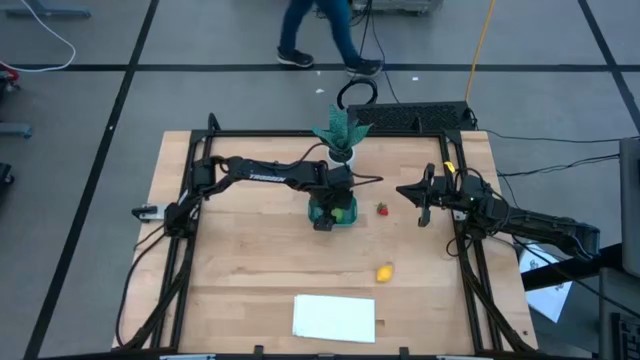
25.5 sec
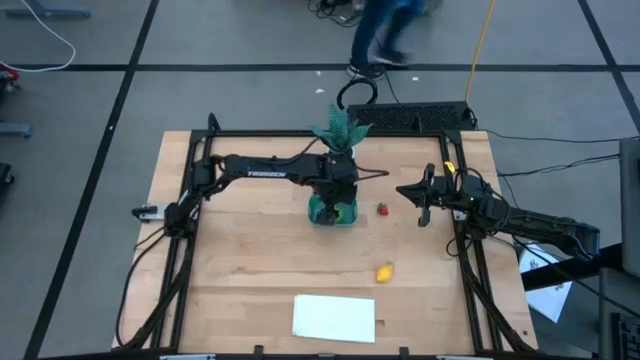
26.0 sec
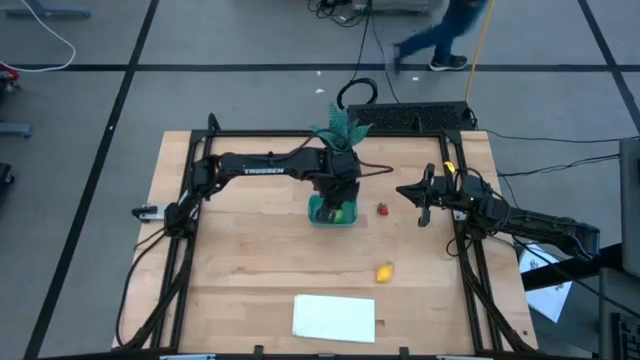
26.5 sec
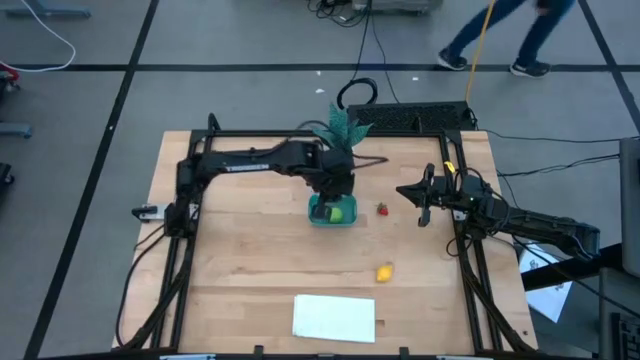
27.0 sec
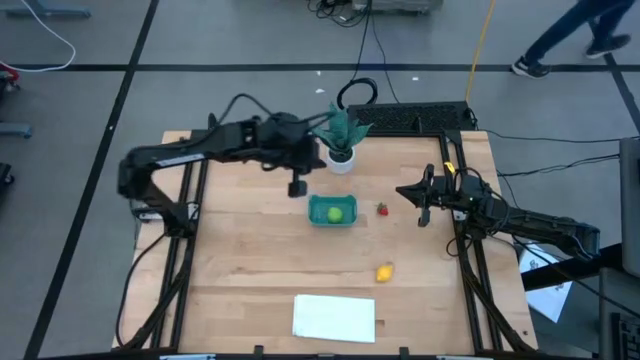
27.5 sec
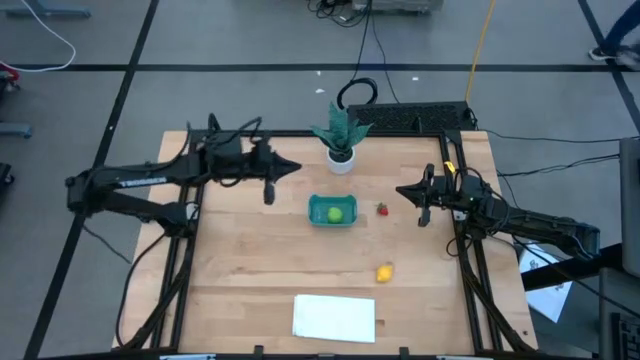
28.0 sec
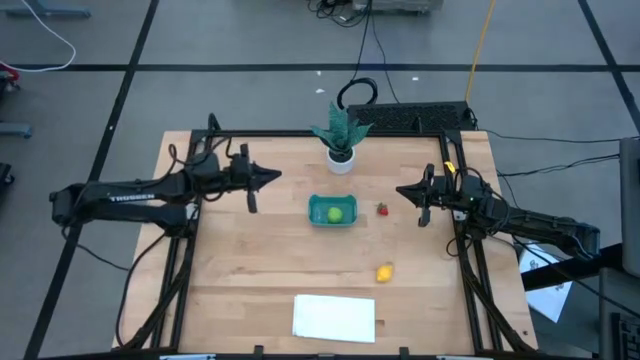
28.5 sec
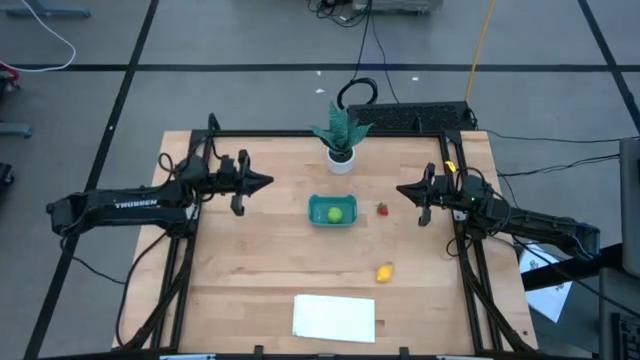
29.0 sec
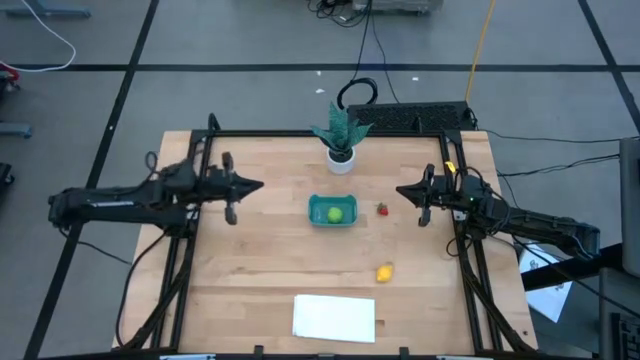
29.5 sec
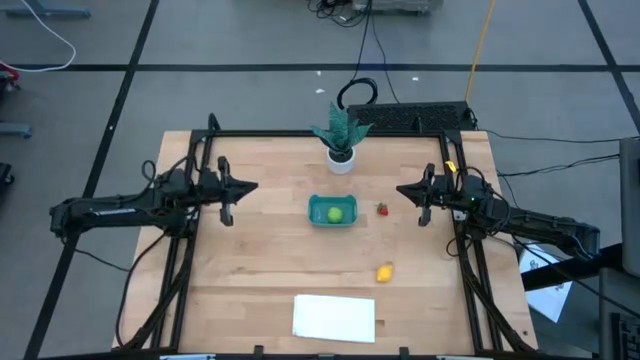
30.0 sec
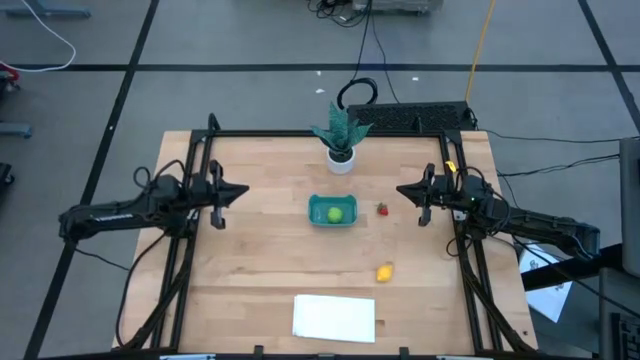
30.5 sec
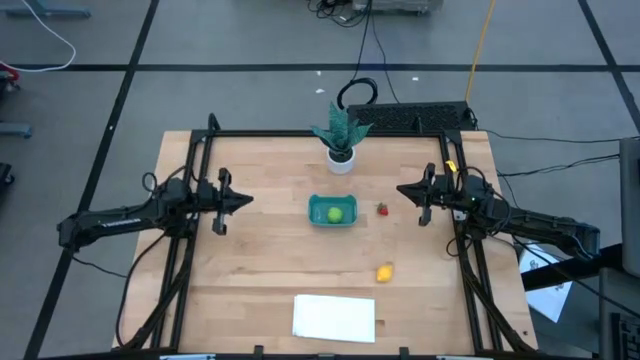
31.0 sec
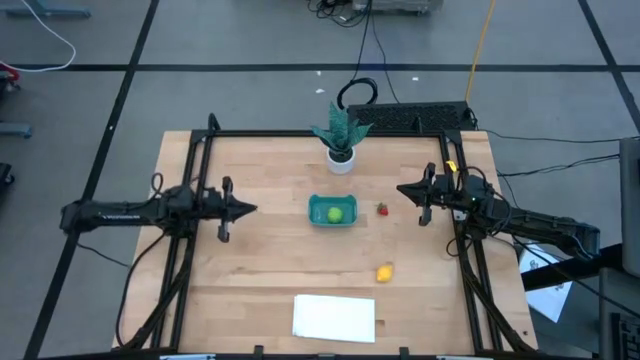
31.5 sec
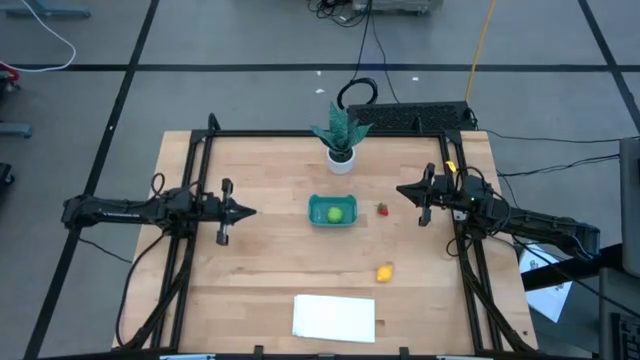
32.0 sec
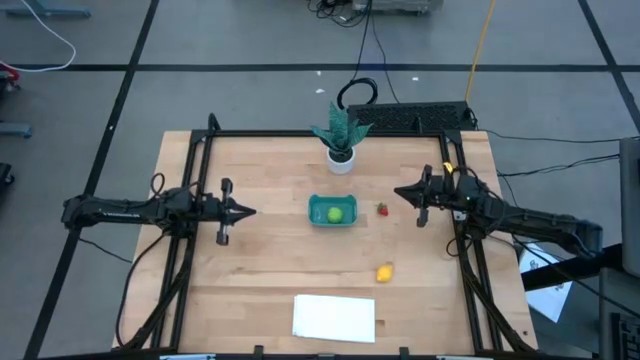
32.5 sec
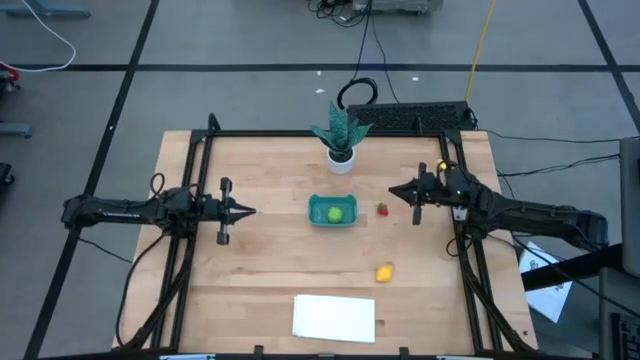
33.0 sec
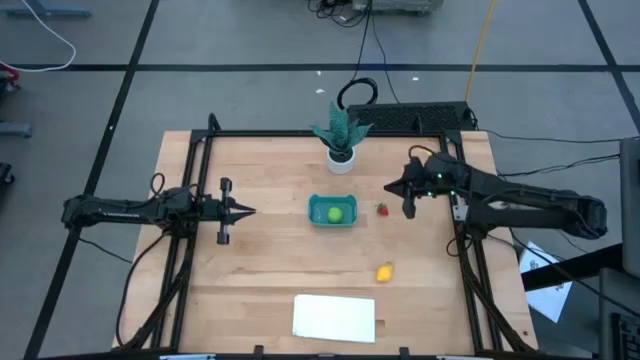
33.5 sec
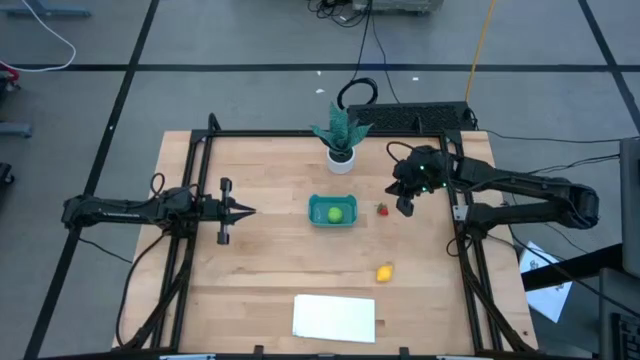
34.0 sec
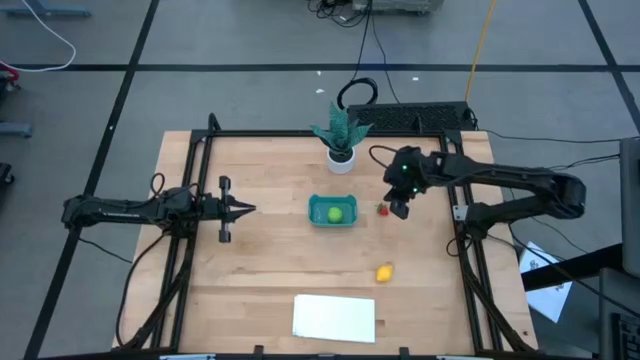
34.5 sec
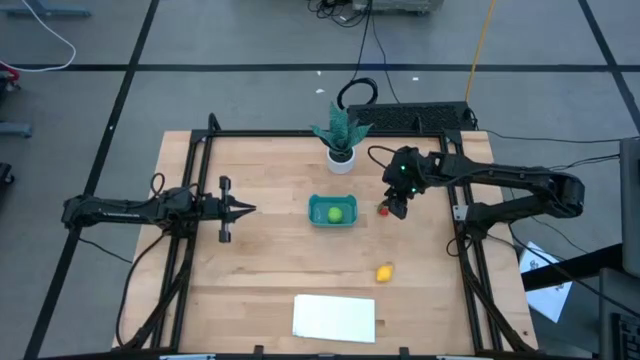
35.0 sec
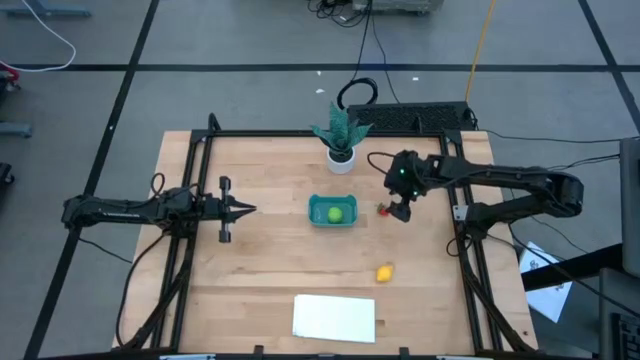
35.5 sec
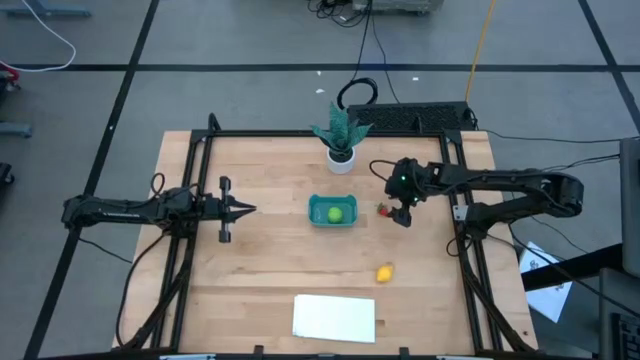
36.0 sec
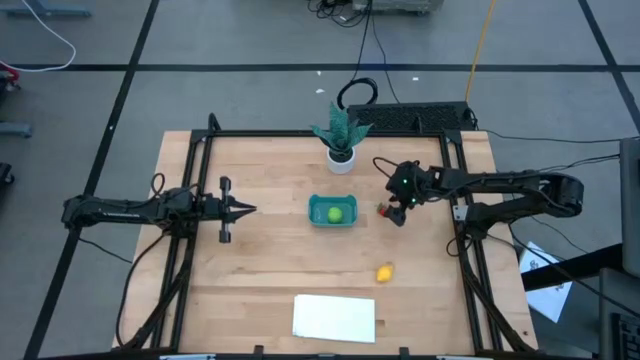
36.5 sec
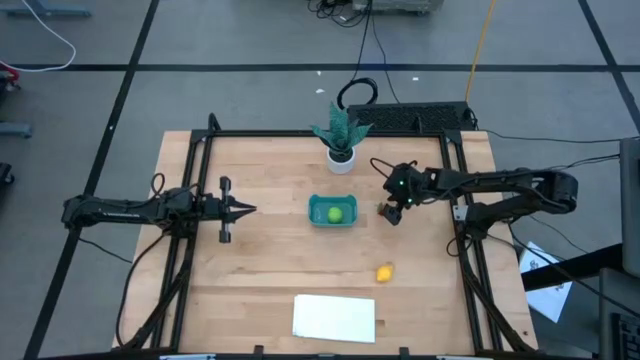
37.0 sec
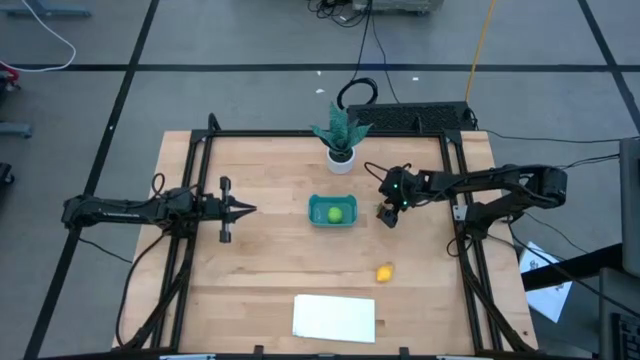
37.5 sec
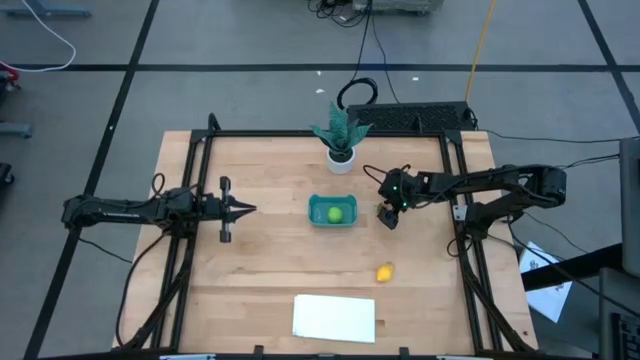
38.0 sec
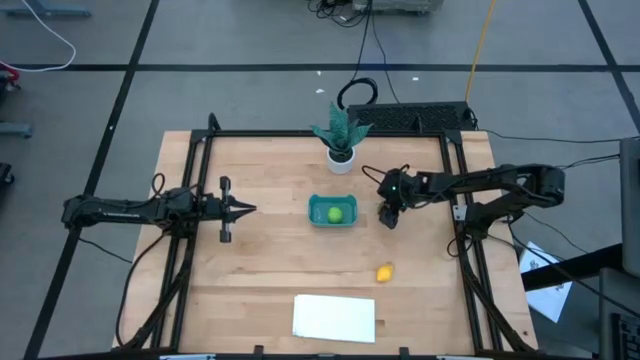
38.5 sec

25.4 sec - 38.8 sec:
Task: Pick and placing Produce into tupperware
Put the red strawberry into the green bin
